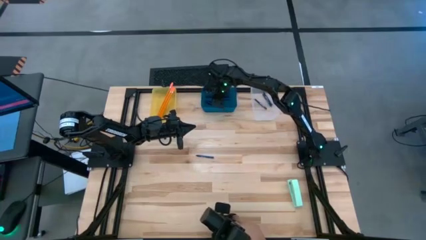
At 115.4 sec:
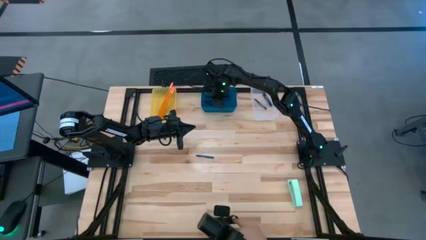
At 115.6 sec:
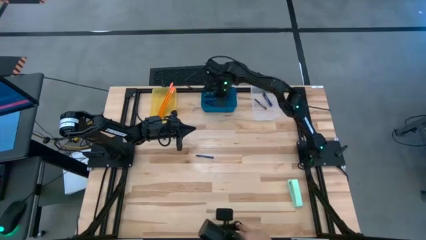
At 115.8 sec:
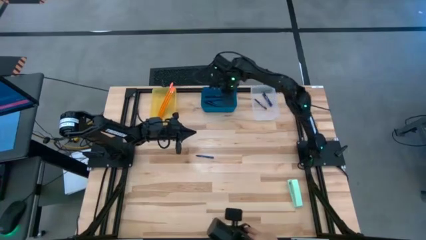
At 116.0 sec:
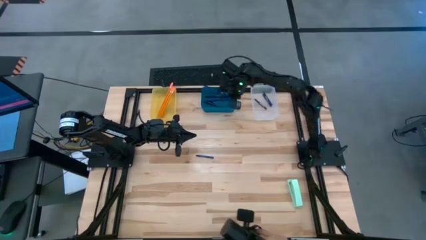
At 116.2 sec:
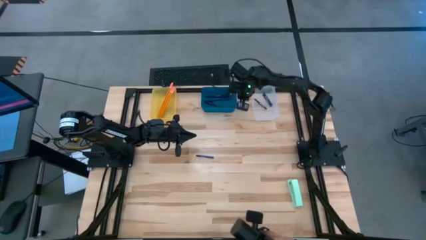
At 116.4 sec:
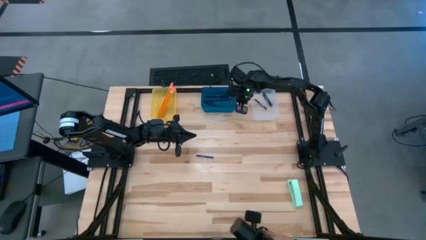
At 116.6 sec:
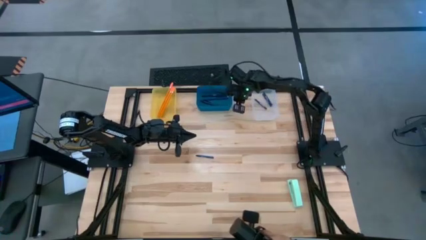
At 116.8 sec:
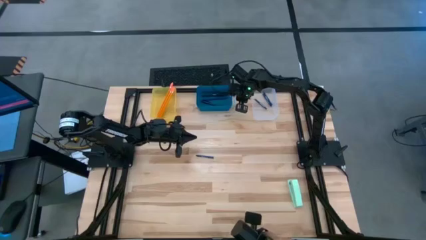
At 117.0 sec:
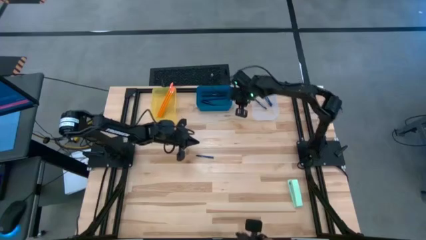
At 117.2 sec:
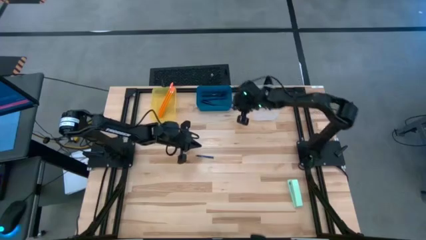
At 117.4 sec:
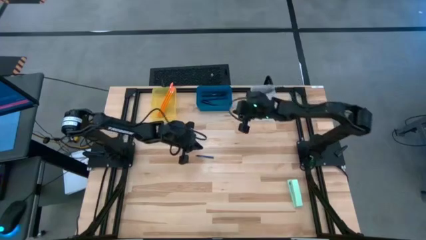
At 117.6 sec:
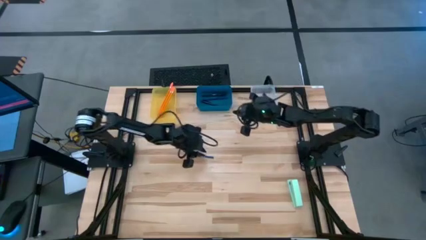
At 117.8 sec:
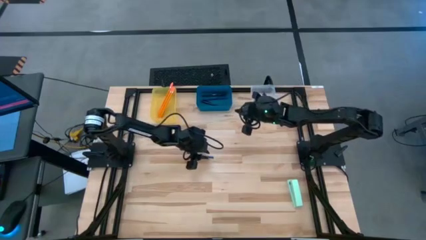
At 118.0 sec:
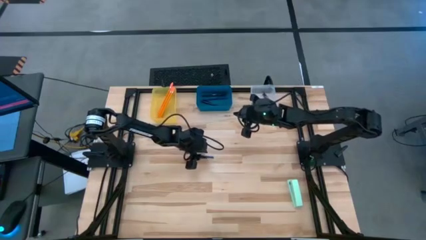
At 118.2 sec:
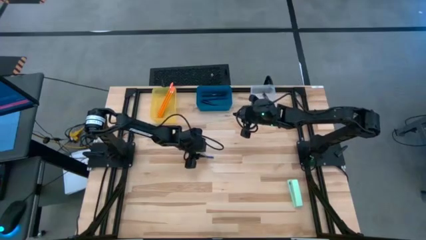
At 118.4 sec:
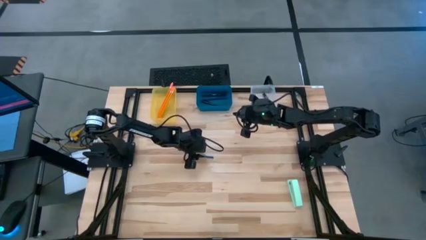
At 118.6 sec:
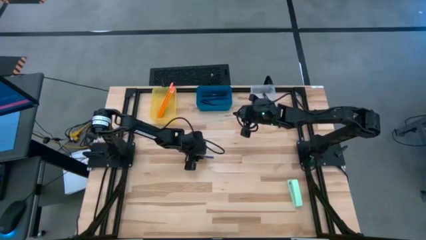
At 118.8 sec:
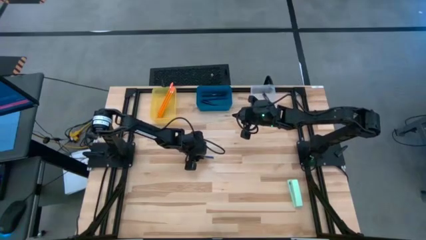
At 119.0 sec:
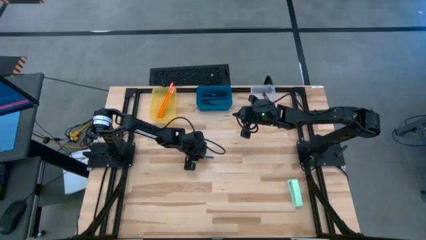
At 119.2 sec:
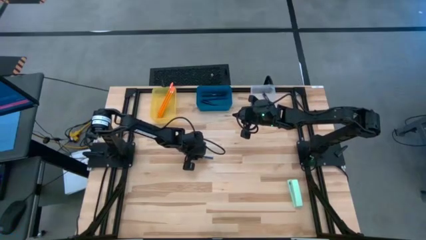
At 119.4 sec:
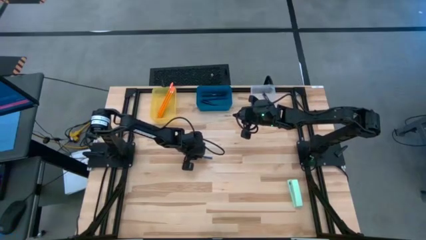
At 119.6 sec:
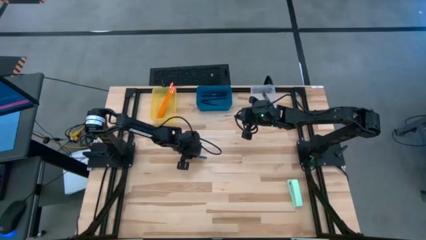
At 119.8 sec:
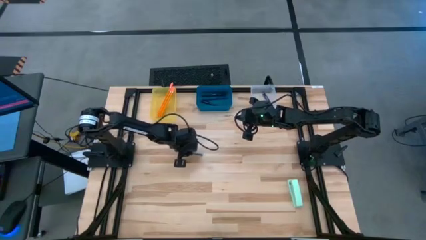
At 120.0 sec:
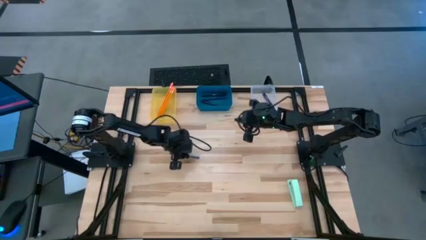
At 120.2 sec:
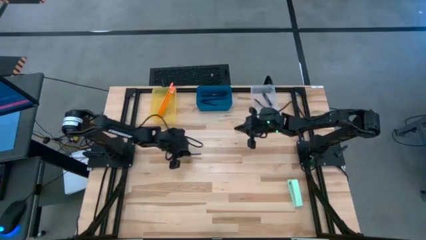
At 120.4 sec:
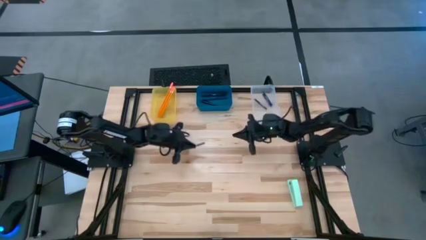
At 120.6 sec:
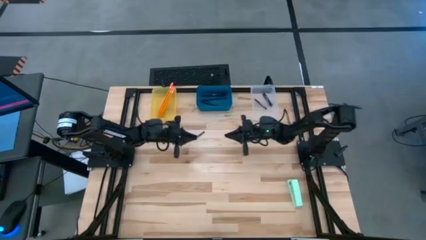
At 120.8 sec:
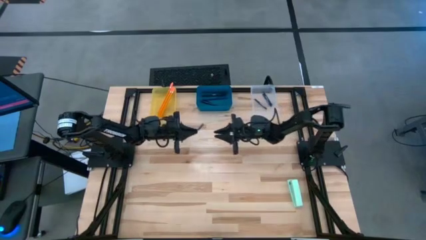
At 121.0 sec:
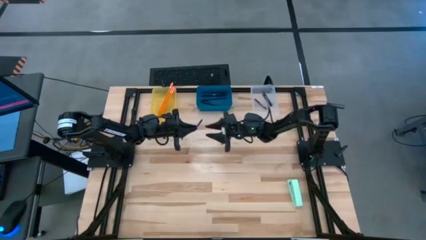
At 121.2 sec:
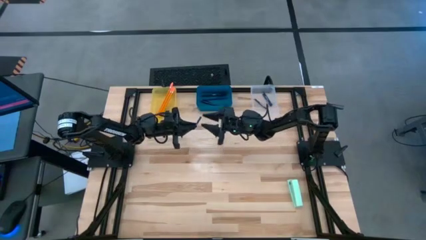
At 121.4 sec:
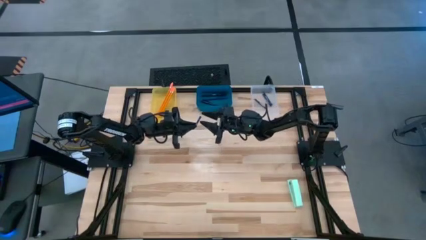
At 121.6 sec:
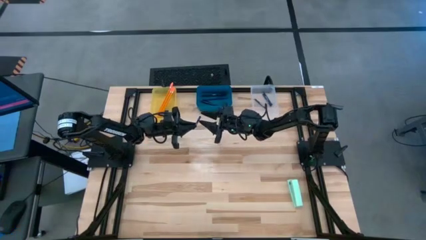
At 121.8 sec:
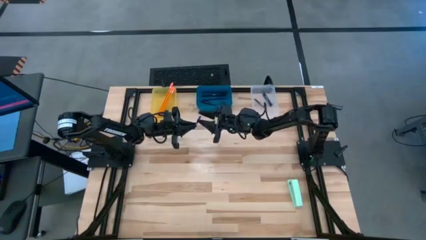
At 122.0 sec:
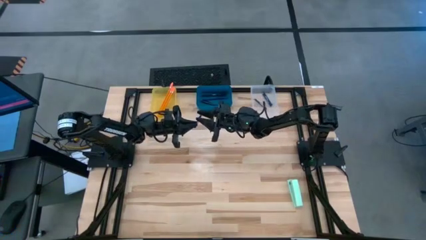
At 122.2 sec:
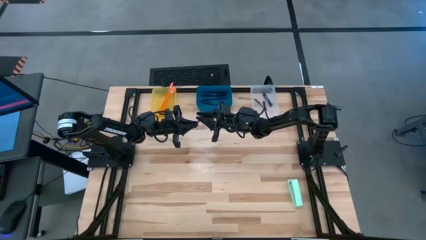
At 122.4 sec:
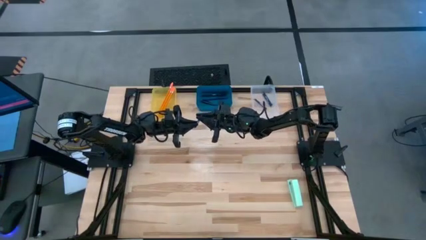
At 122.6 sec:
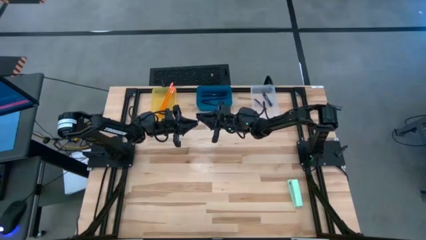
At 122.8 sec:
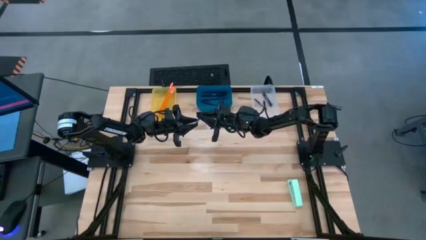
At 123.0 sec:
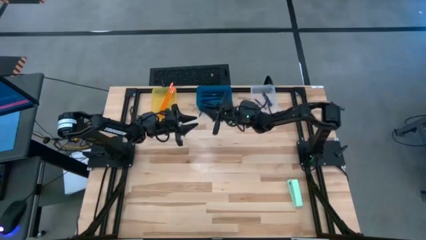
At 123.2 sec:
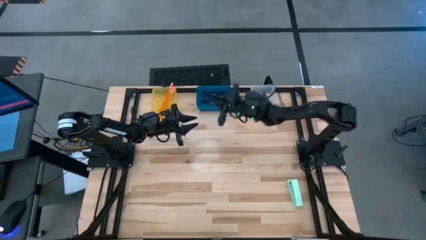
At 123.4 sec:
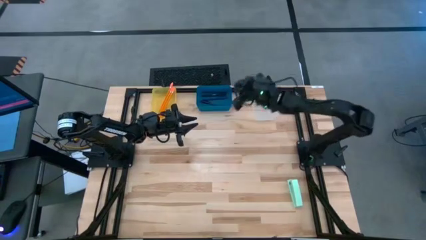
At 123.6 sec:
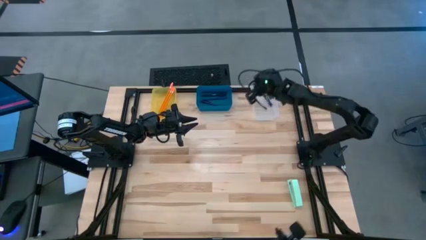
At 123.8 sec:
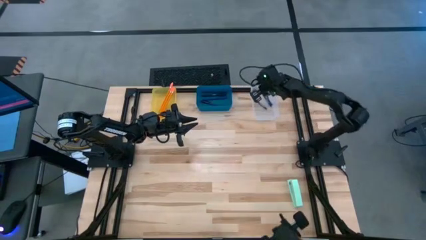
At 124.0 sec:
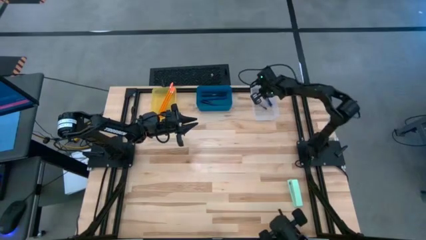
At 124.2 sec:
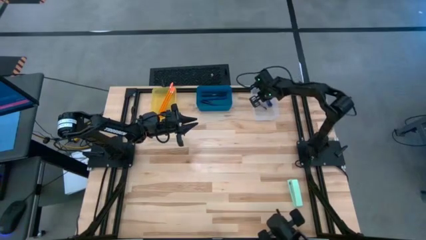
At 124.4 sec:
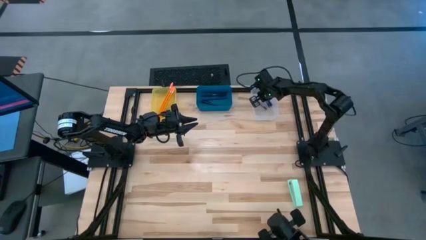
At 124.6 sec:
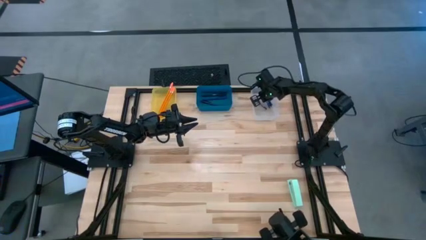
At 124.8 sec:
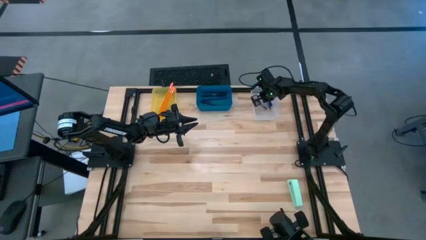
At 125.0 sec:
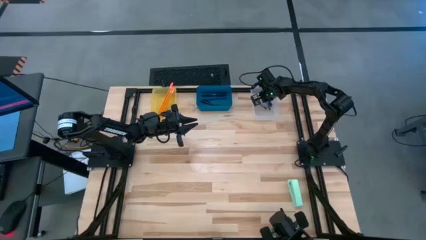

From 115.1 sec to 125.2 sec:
Task: Sort crayons/erasers/pens/pencils in bins
Put the blue crayon into the transparent white bin

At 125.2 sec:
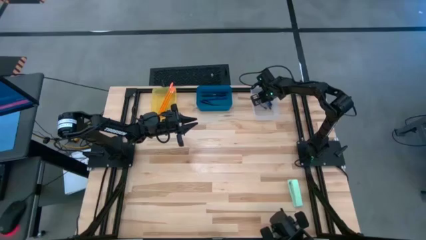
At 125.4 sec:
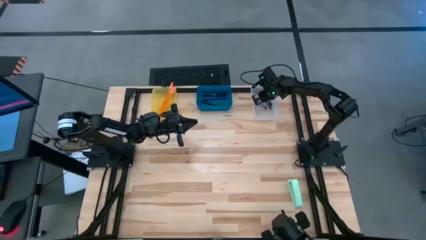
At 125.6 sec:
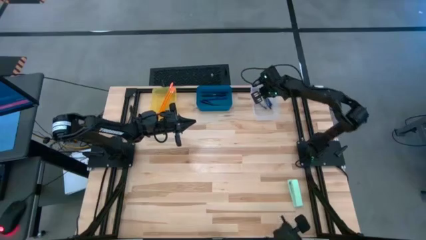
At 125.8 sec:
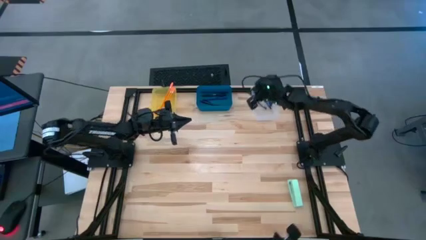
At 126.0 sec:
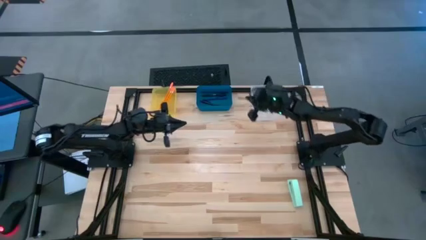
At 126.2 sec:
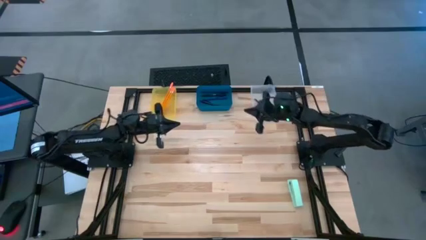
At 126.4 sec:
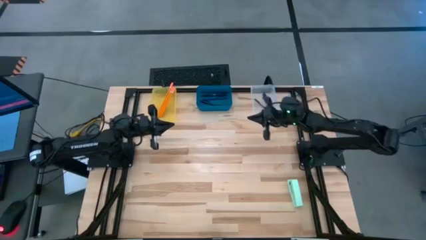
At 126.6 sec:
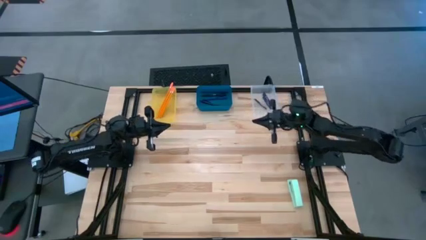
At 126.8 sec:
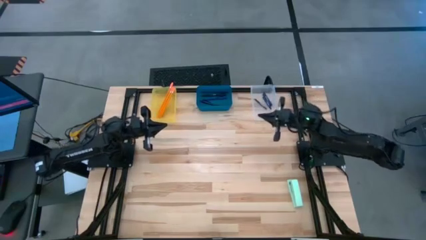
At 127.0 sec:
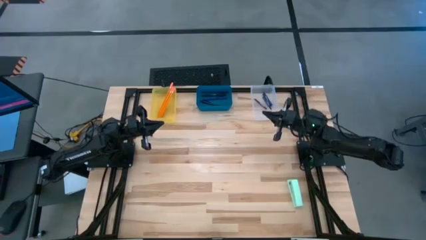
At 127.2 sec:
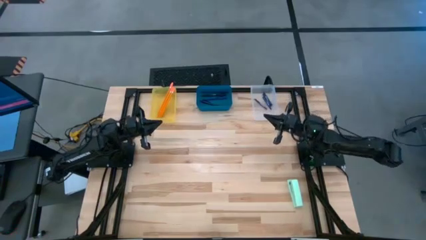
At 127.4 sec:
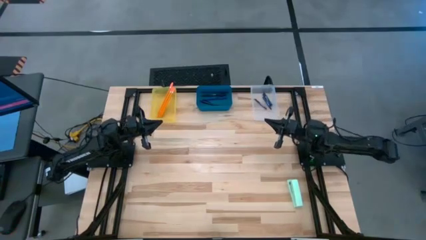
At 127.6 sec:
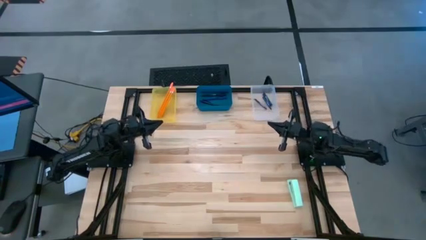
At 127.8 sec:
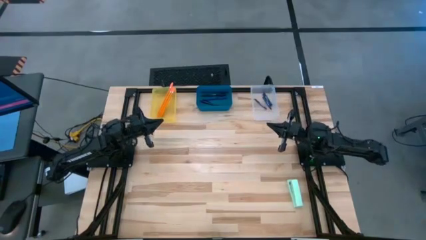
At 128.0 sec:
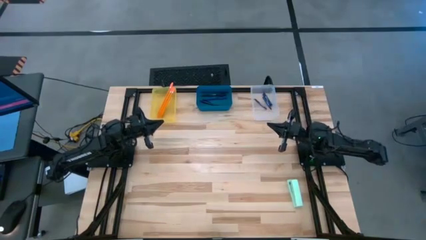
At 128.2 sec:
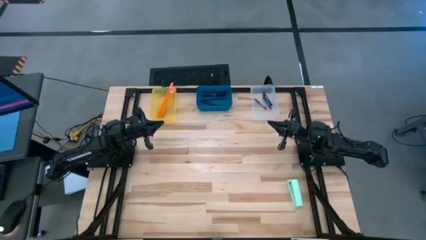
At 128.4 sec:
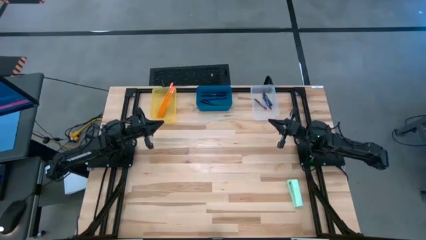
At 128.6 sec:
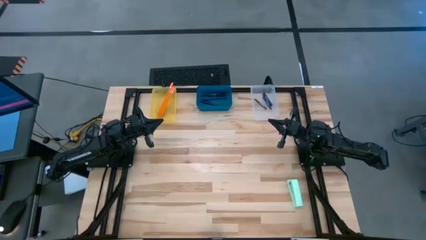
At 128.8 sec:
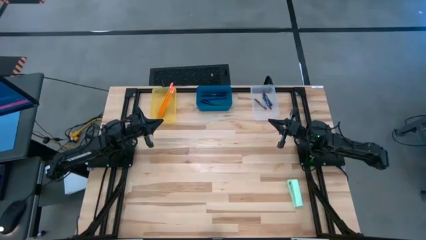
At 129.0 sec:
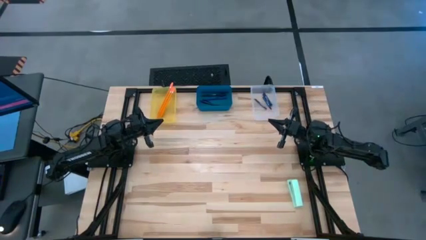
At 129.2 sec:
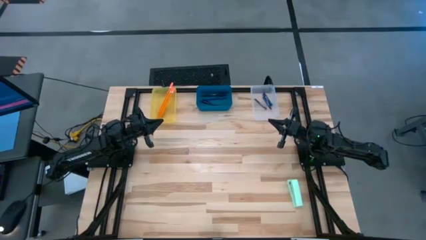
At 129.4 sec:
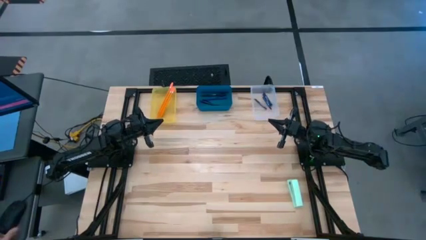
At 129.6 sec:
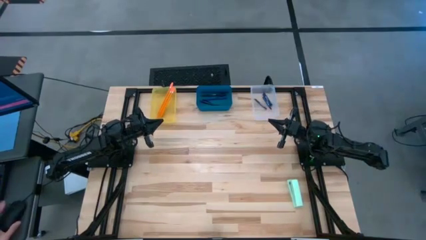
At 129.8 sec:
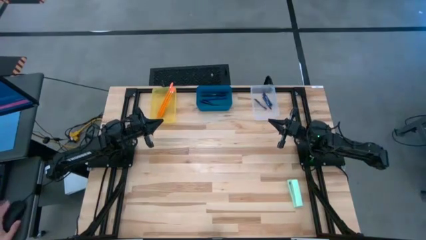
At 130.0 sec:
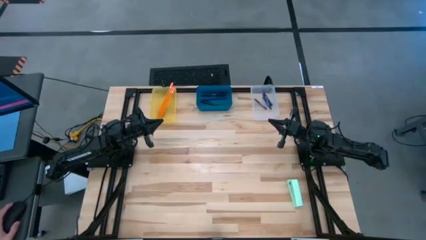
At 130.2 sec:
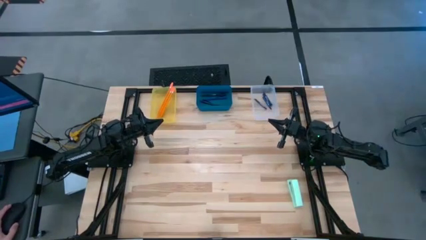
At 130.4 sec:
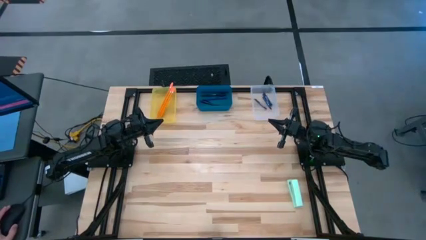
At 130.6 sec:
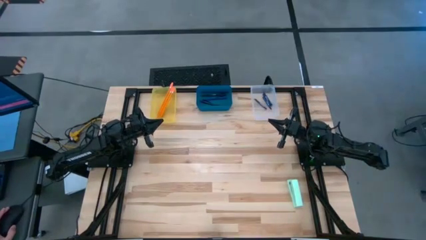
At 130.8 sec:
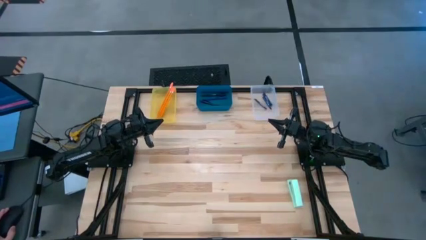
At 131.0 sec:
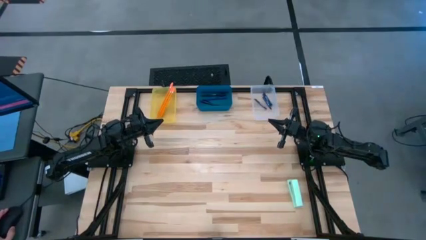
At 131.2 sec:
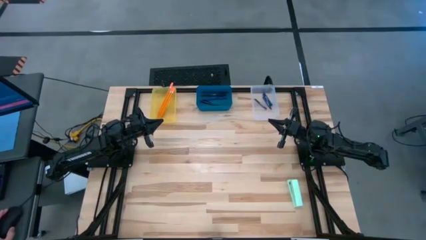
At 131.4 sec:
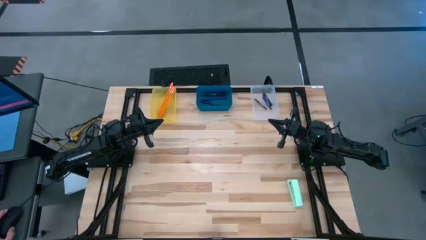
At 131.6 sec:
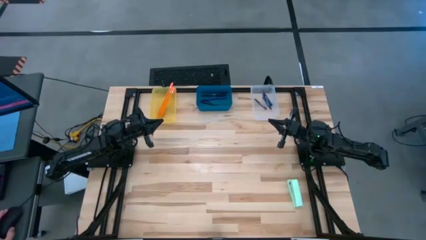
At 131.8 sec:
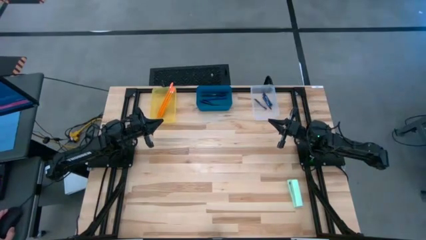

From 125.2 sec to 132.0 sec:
Return to Home Position
